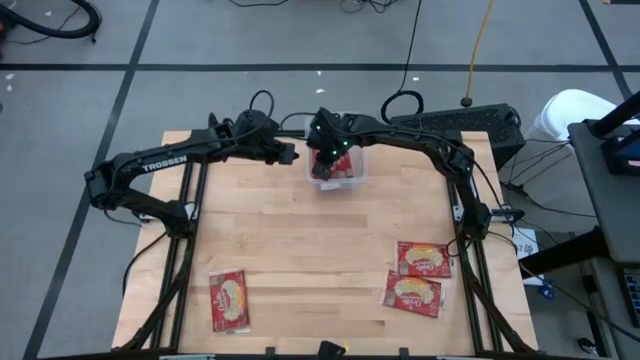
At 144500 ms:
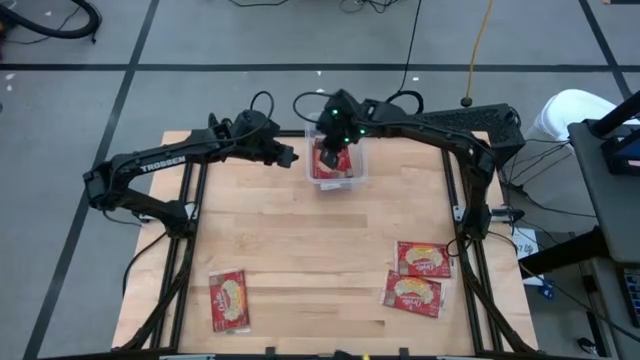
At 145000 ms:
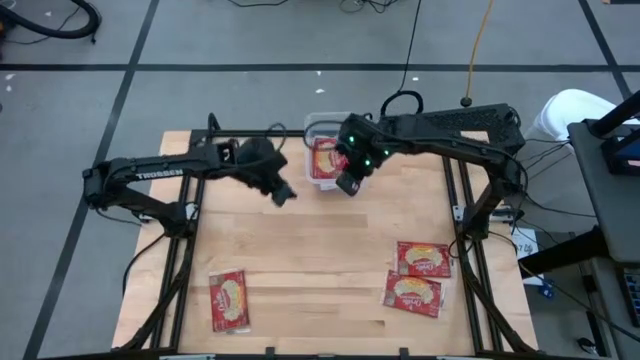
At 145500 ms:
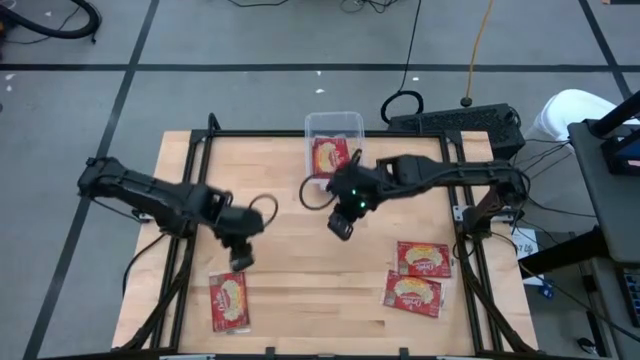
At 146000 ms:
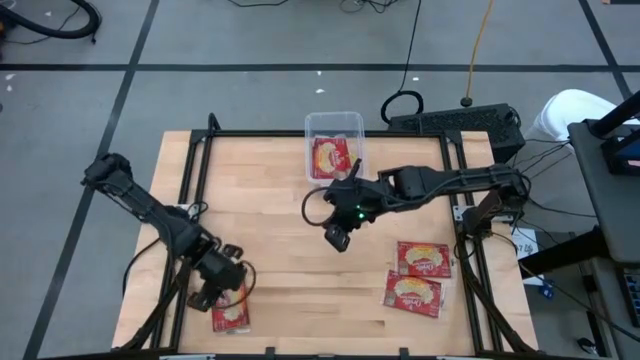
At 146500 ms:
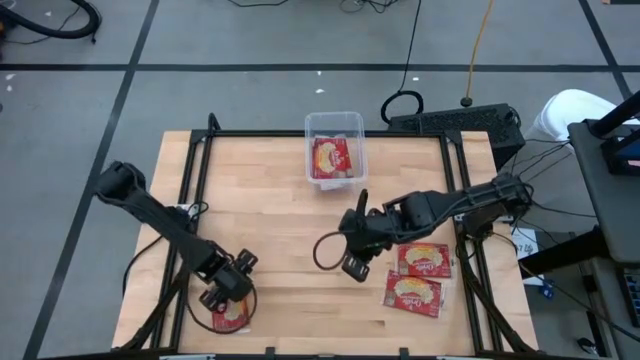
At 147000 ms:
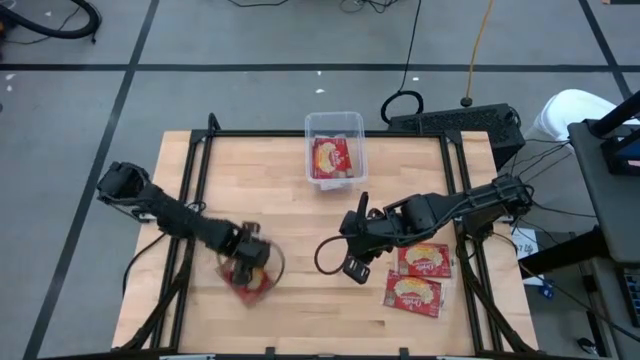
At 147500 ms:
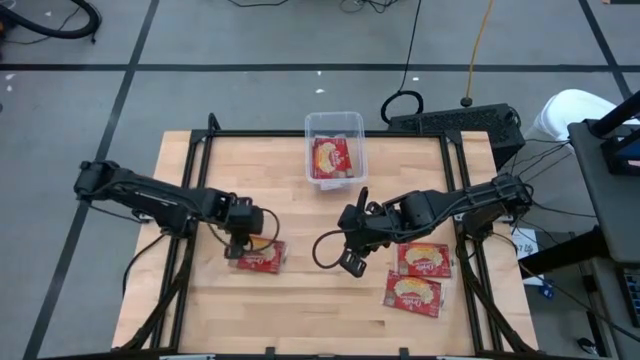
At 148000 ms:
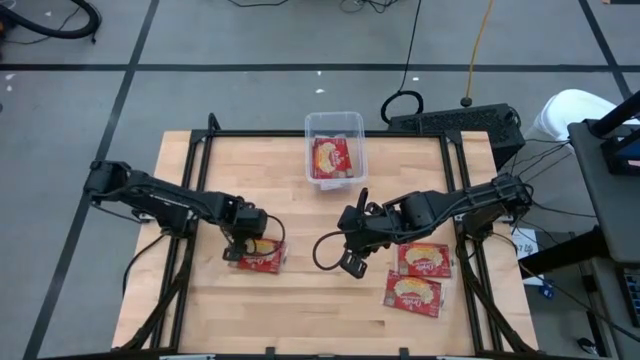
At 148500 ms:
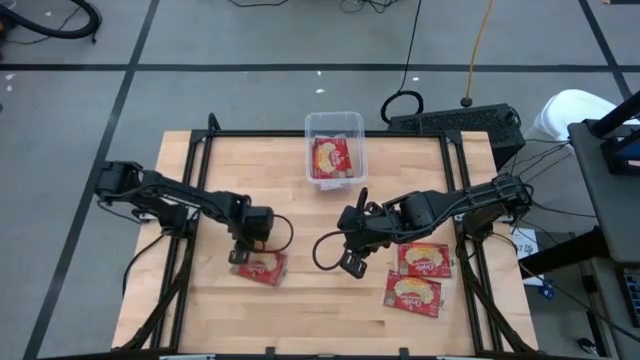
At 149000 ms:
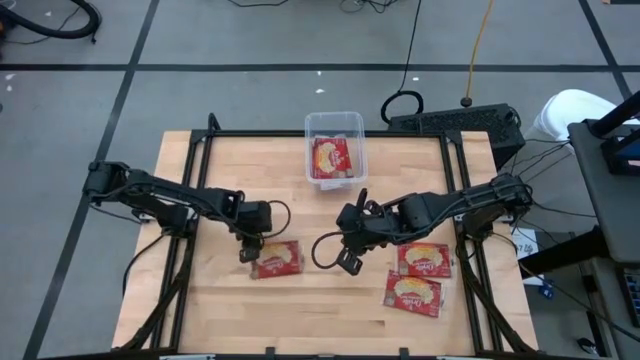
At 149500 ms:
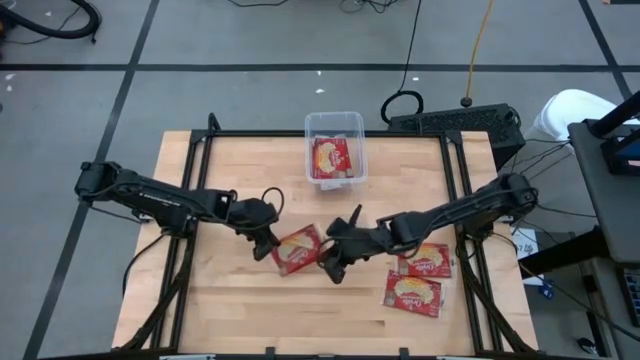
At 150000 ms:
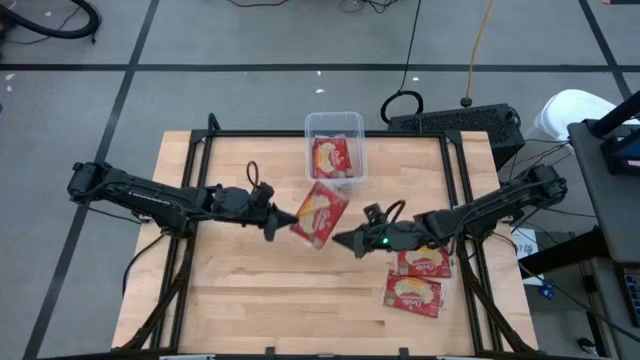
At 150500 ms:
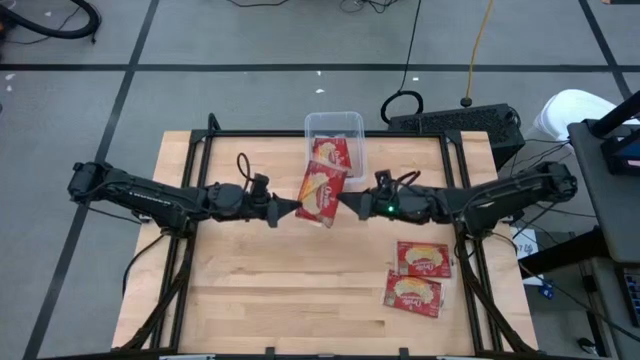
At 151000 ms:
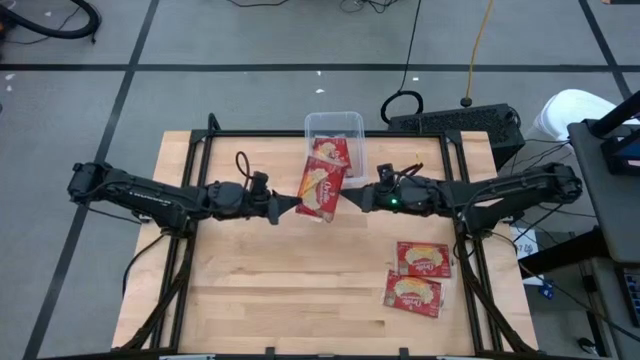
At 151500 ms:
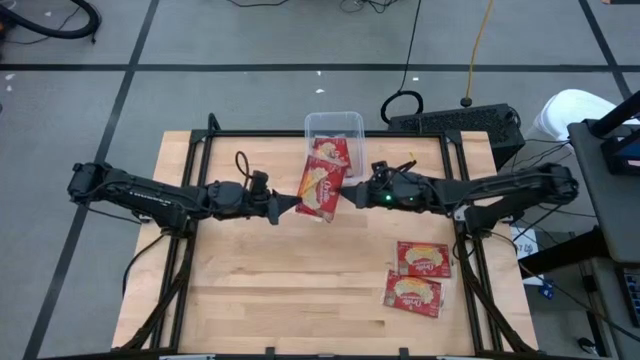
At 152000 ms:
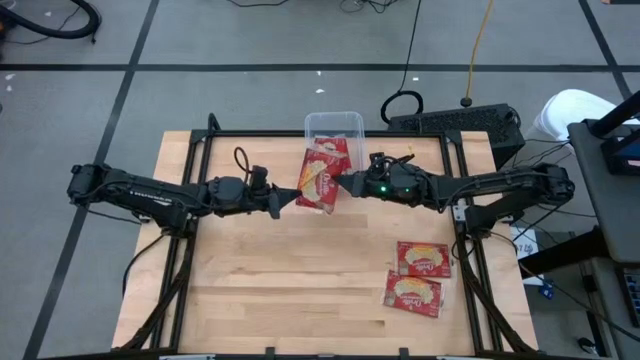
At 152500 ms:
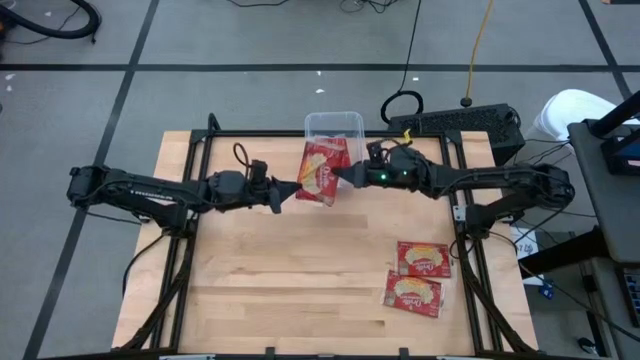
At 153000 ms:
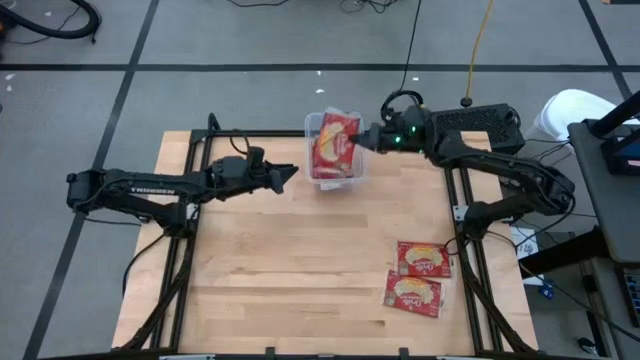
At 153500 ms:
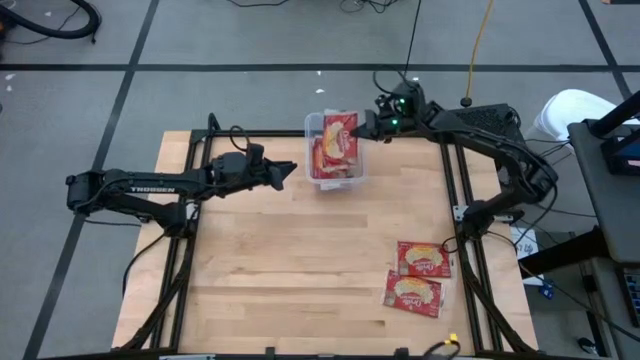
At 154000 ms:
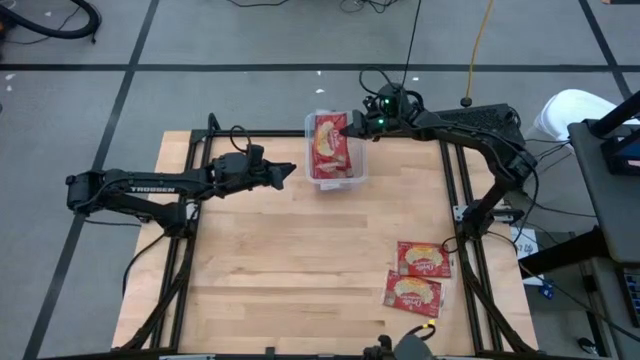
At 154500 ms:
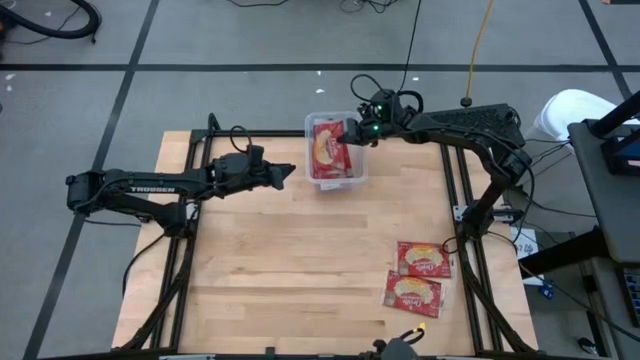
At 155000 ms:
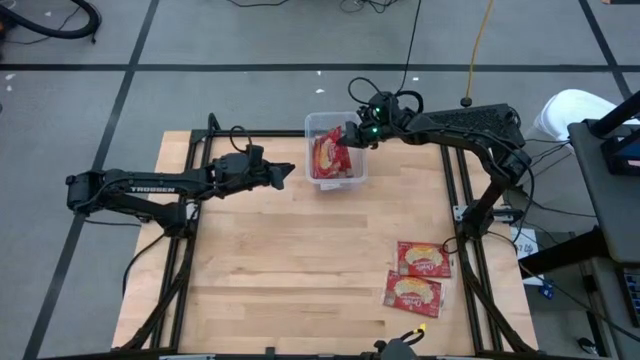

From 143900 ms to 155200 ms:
Task: Sort popcorn bags into baskets
Put the red popcorn bag into the transparent container

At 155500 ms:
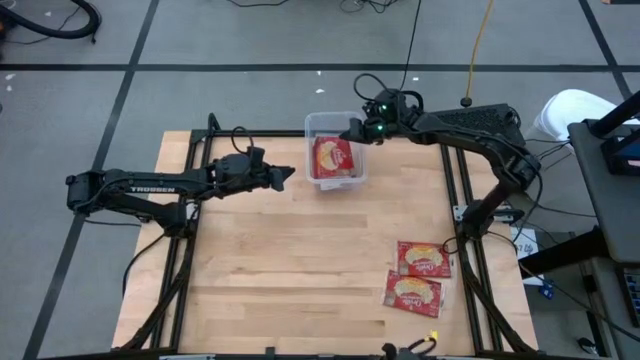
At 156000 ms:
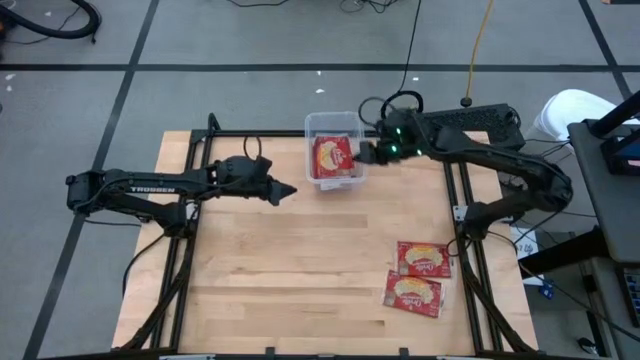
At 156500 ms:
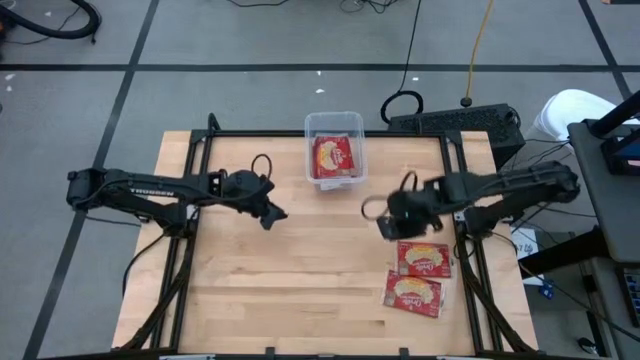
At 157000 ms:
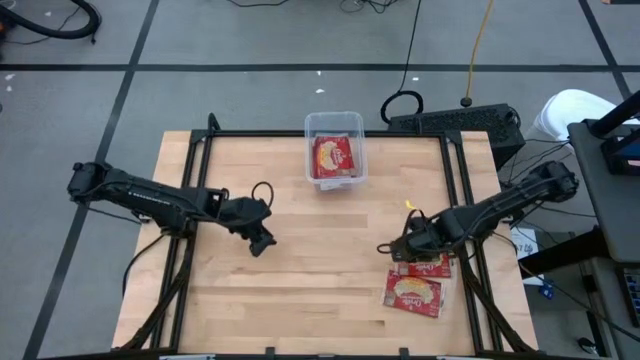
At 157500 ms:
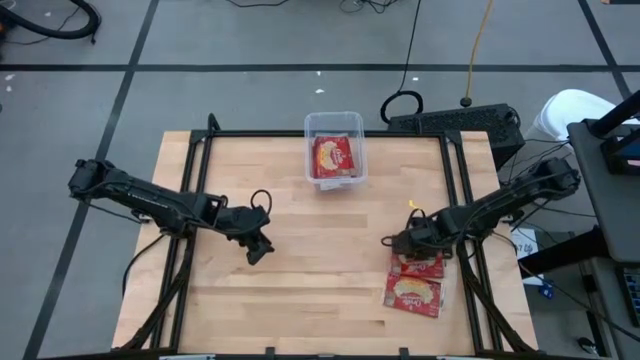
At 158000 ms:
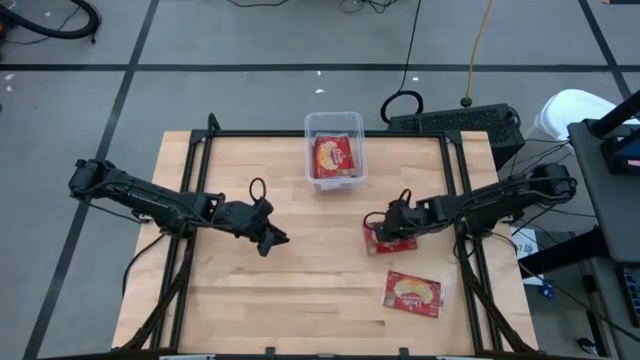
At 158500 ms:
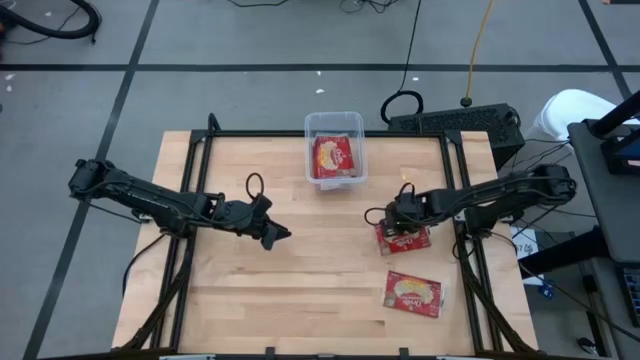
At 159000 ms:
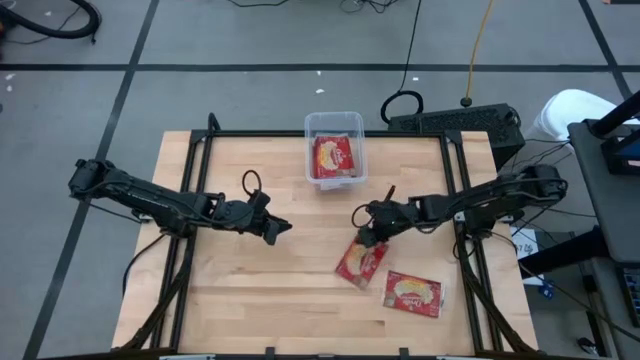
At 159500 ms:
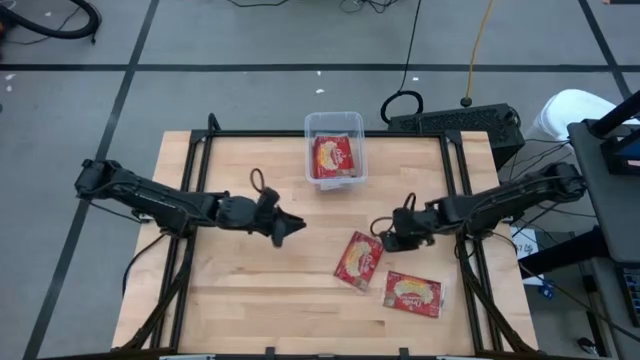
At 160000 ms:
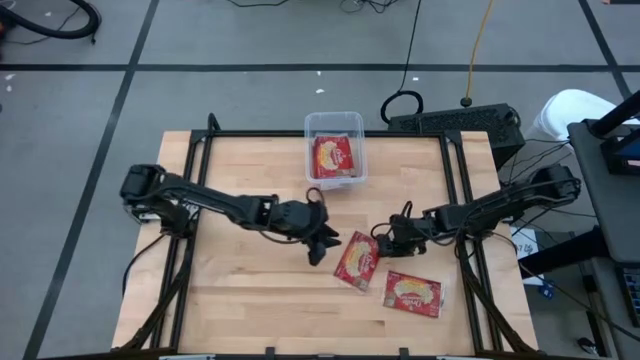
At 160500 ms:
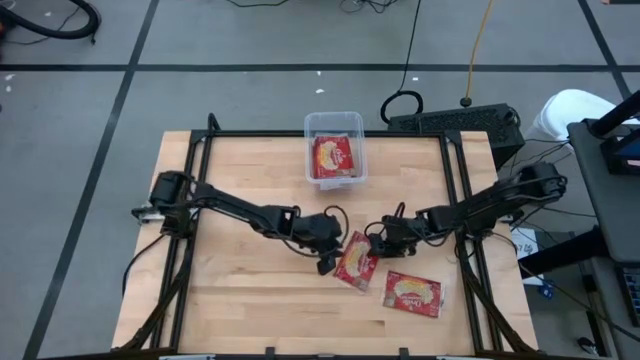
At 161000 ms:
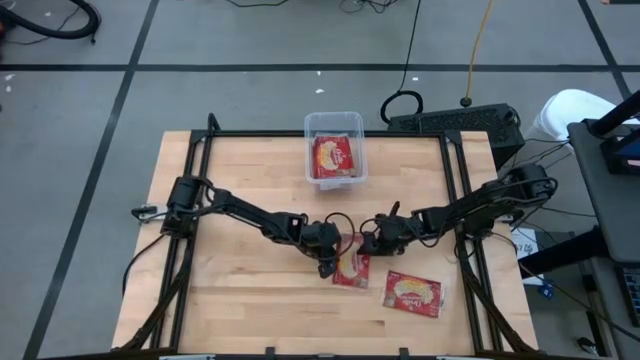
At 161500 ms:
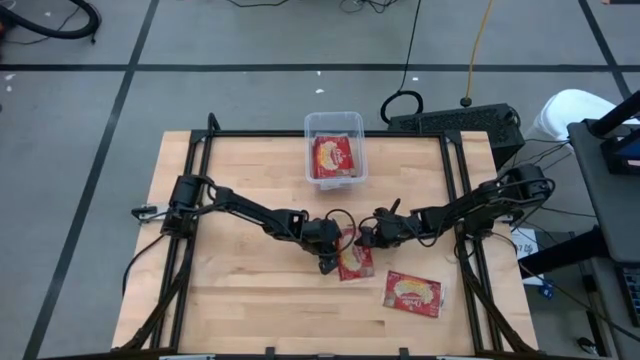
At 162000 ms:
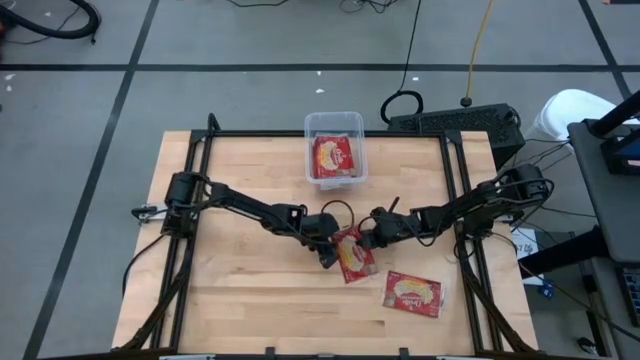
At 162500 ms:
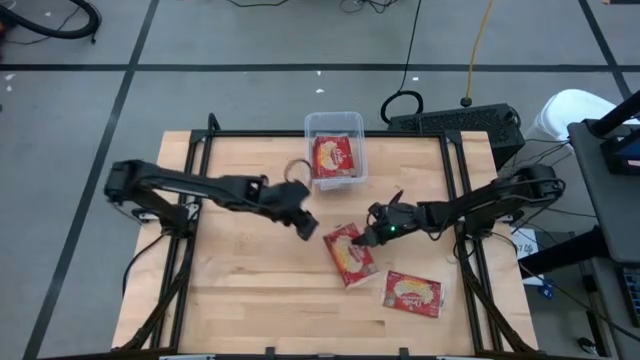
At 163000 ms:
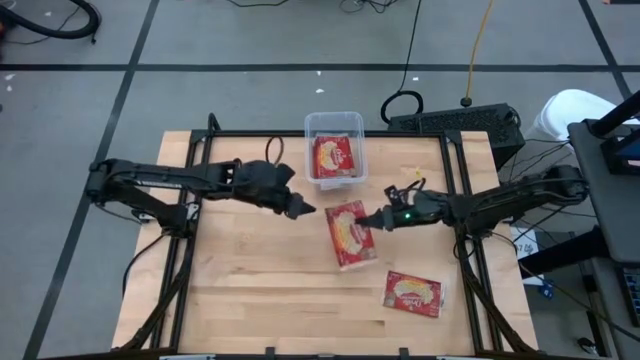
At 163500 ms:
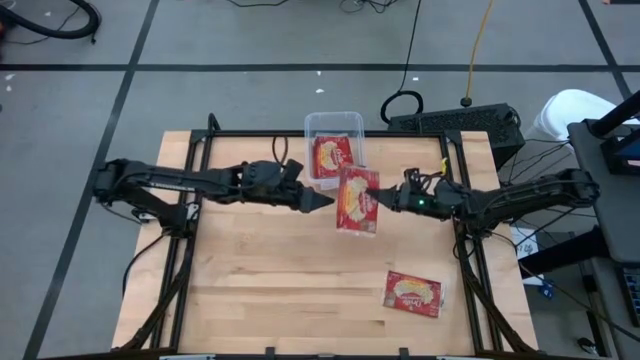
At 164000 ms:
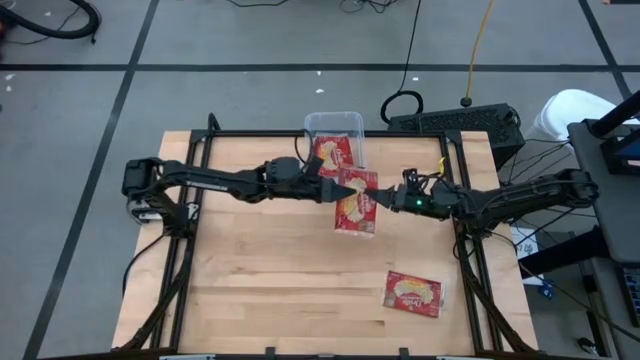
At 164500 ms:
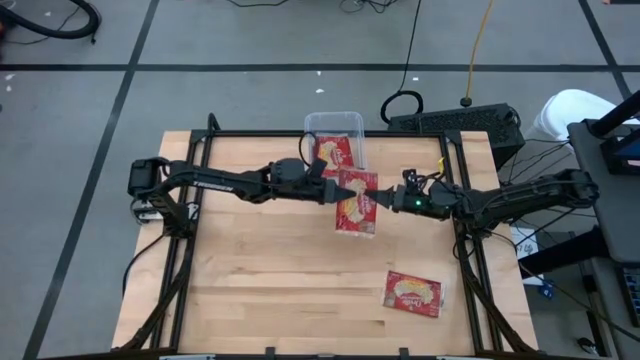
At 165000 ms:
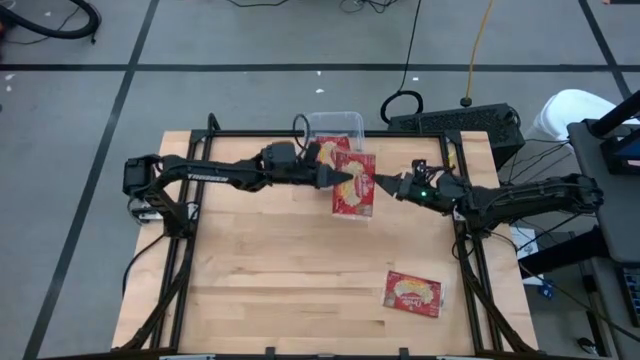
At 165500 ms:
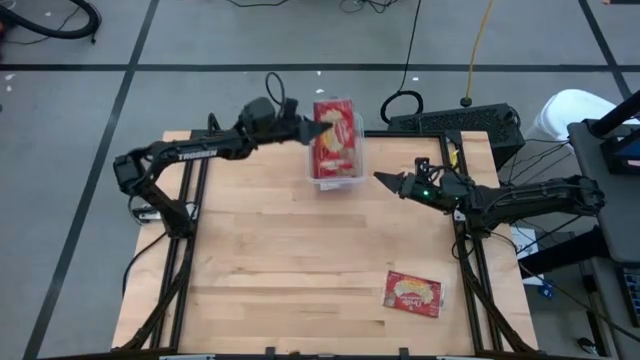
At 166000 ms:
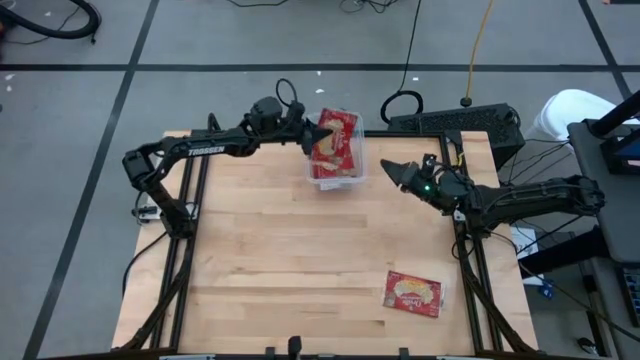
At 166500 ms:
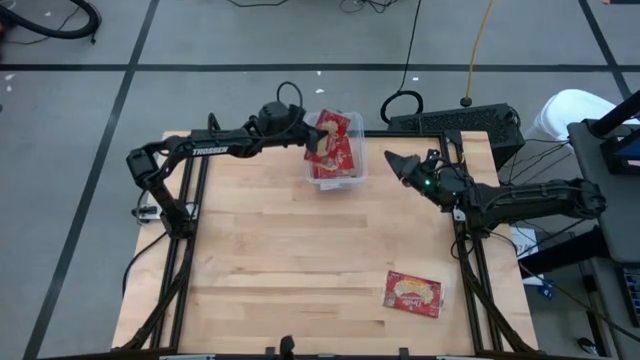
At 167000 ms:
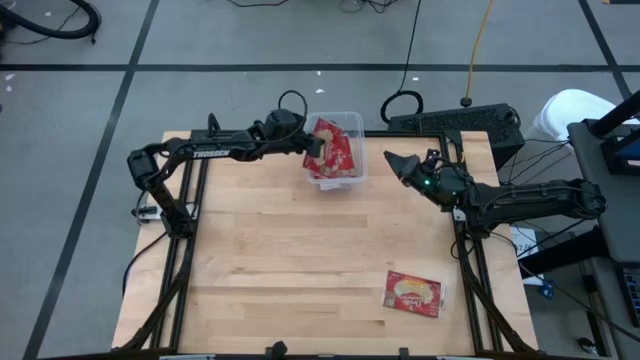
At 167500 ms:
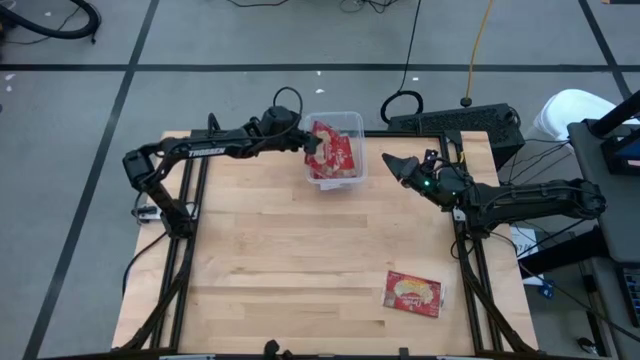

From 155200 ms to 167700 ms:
Put the red popcorn bag into the transparent container
